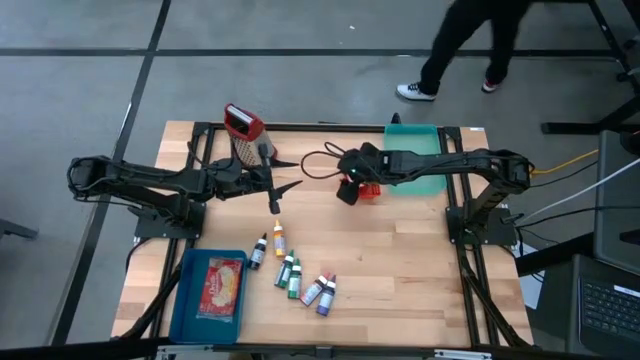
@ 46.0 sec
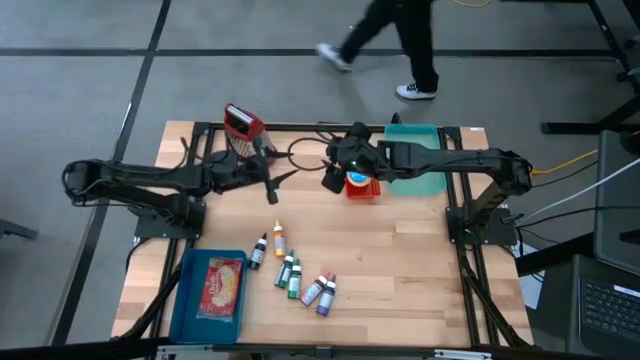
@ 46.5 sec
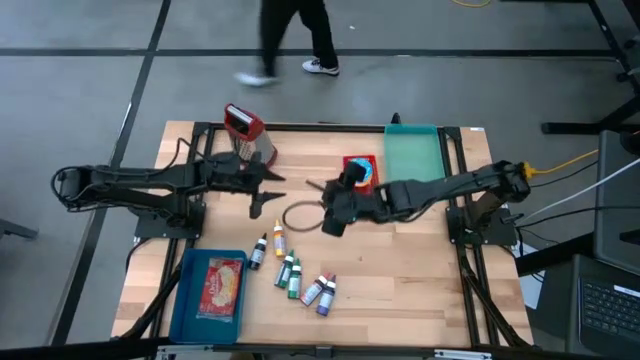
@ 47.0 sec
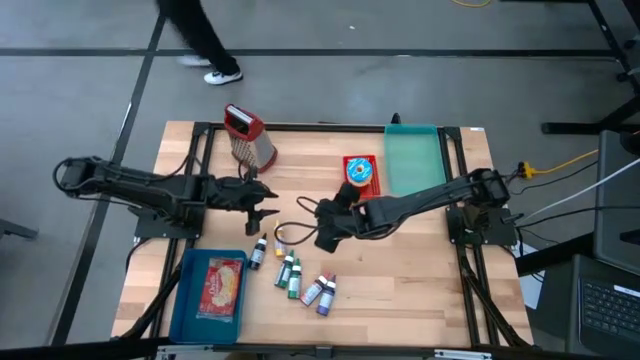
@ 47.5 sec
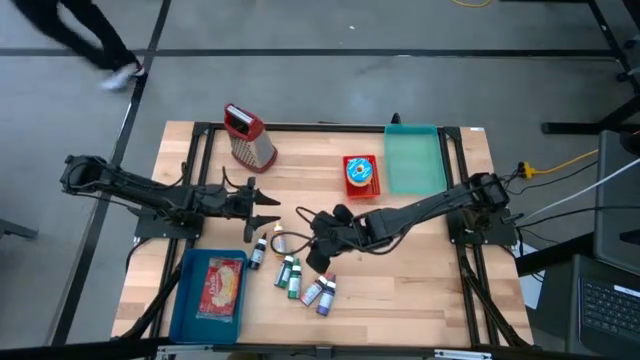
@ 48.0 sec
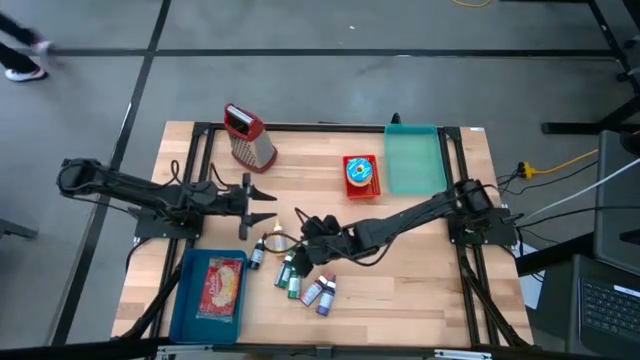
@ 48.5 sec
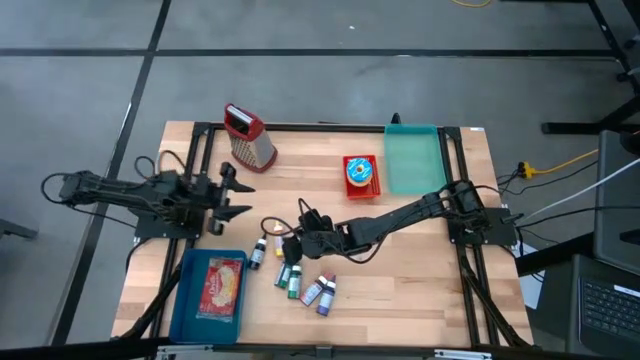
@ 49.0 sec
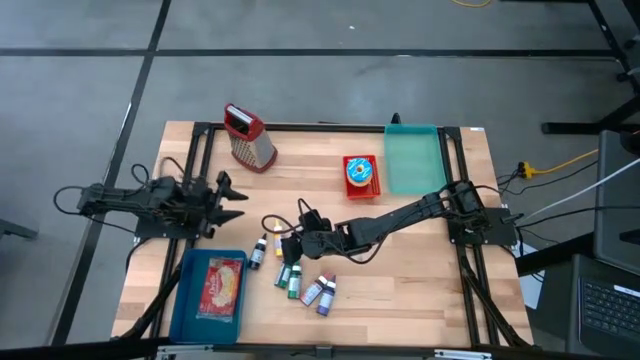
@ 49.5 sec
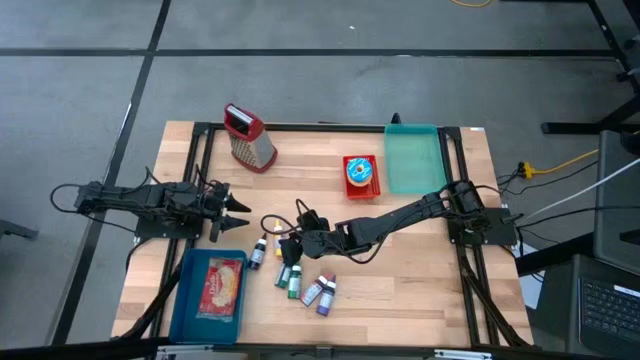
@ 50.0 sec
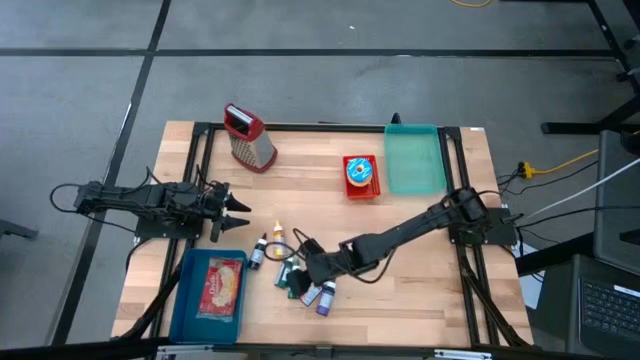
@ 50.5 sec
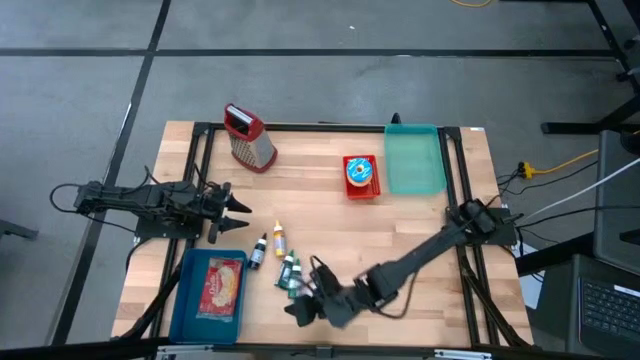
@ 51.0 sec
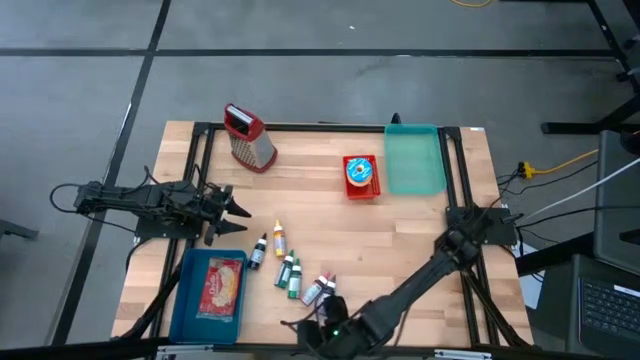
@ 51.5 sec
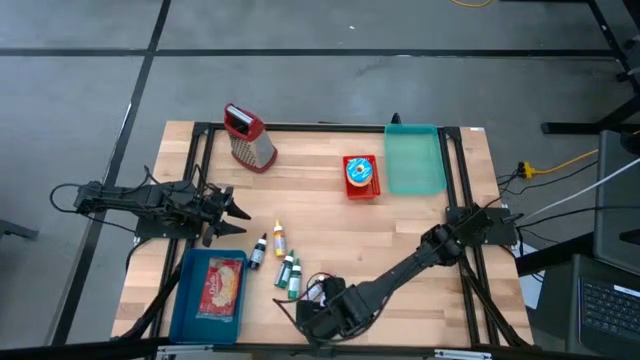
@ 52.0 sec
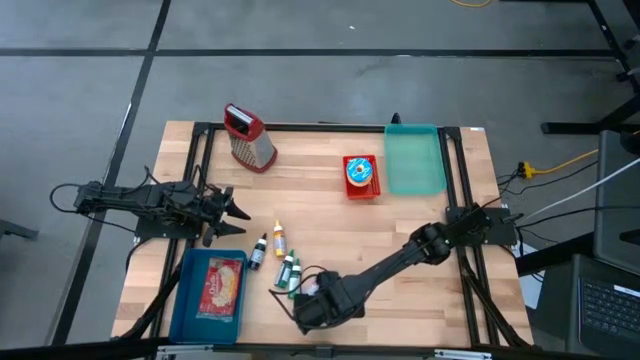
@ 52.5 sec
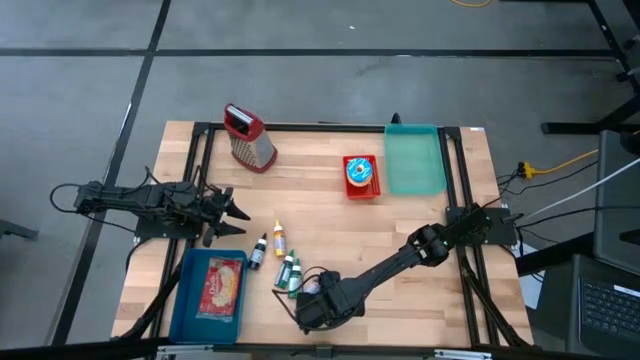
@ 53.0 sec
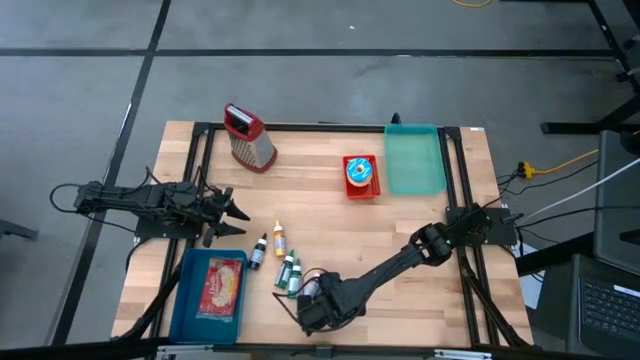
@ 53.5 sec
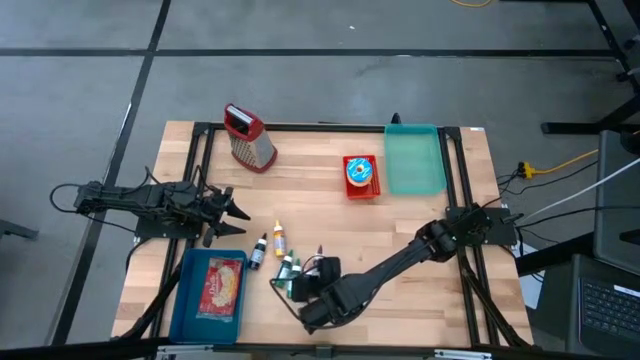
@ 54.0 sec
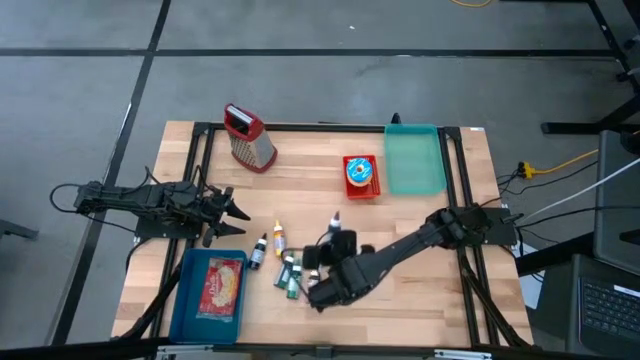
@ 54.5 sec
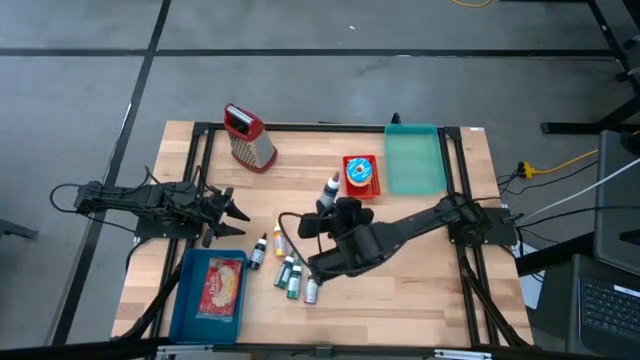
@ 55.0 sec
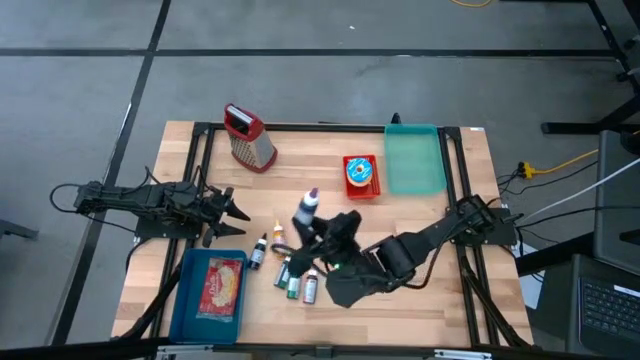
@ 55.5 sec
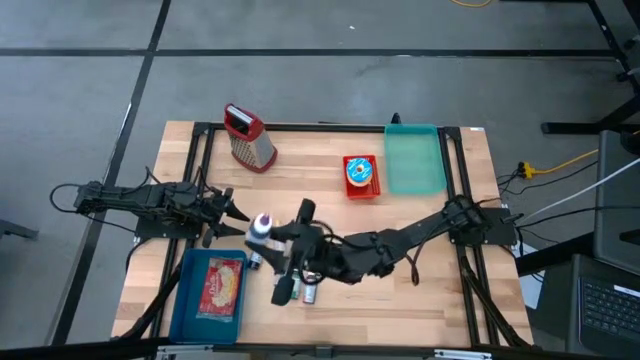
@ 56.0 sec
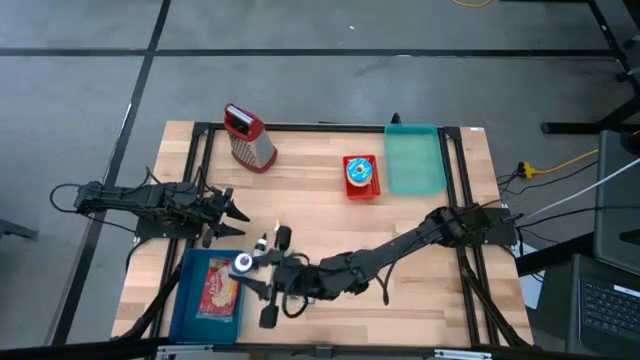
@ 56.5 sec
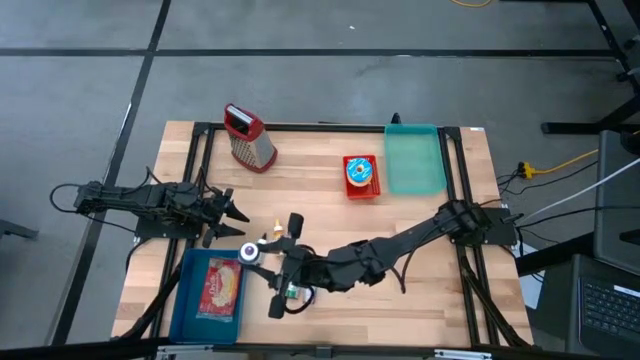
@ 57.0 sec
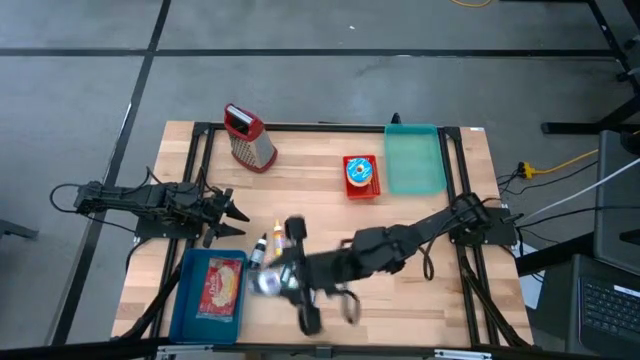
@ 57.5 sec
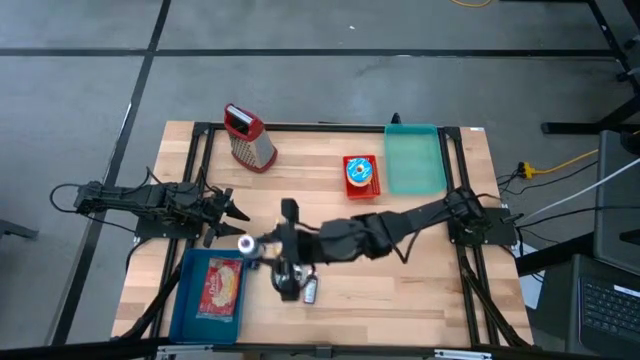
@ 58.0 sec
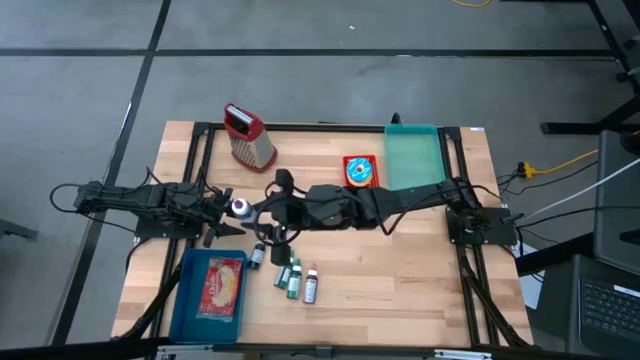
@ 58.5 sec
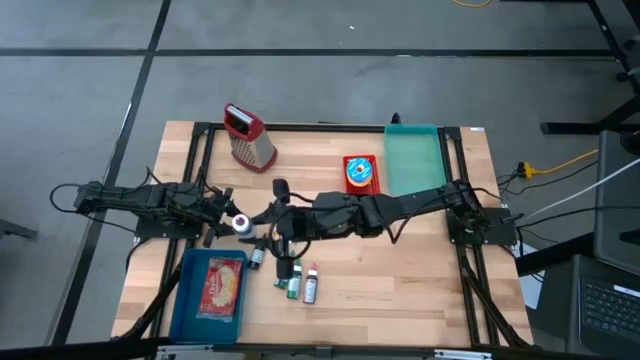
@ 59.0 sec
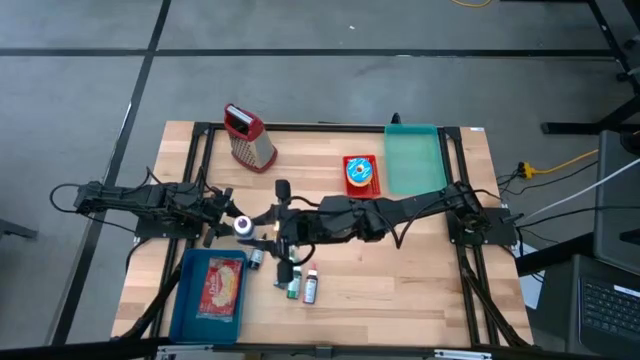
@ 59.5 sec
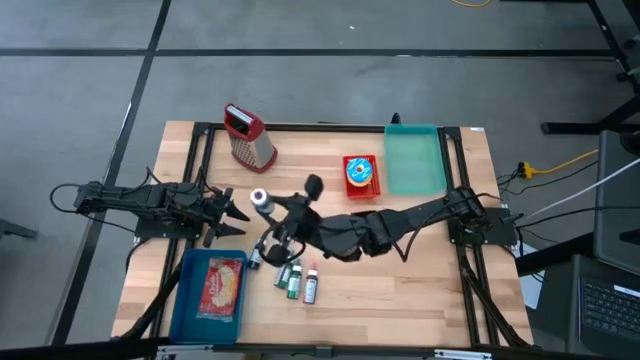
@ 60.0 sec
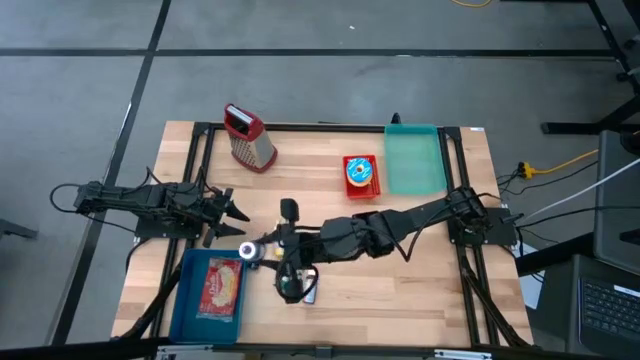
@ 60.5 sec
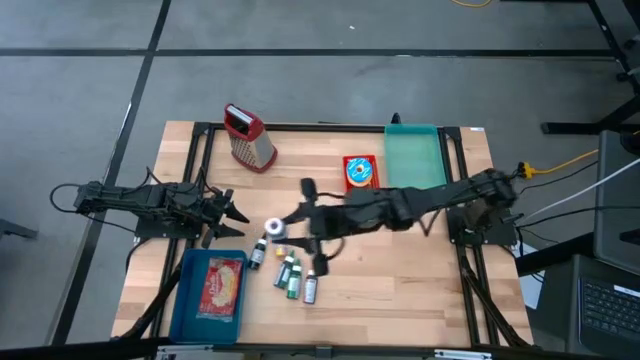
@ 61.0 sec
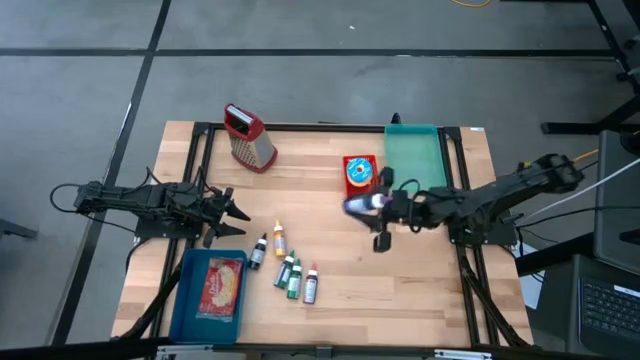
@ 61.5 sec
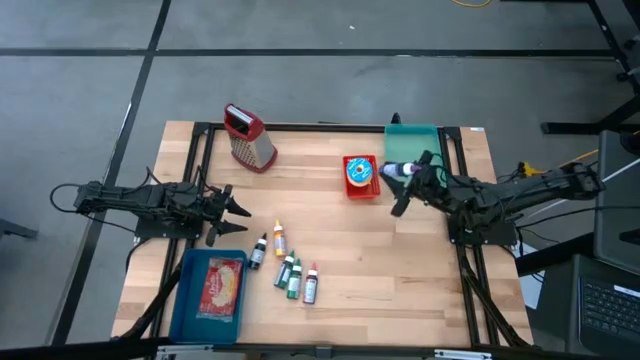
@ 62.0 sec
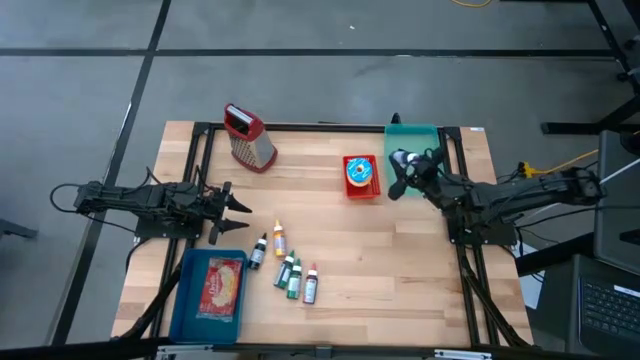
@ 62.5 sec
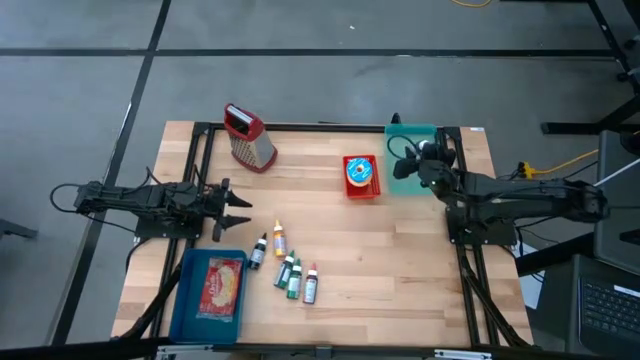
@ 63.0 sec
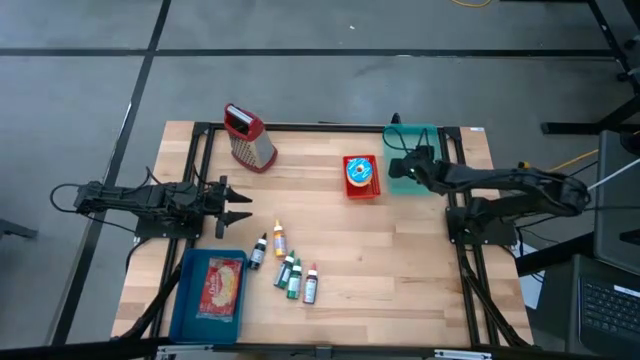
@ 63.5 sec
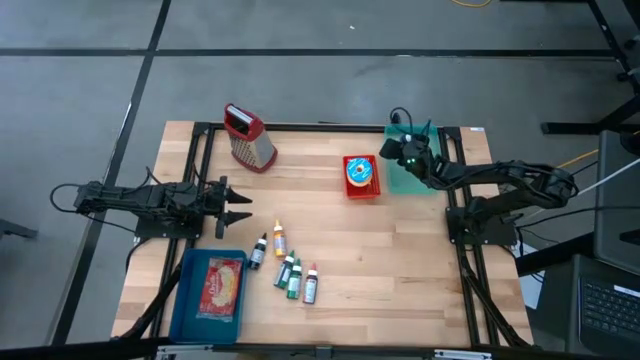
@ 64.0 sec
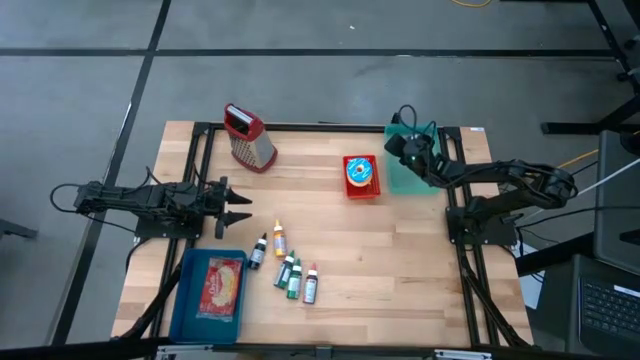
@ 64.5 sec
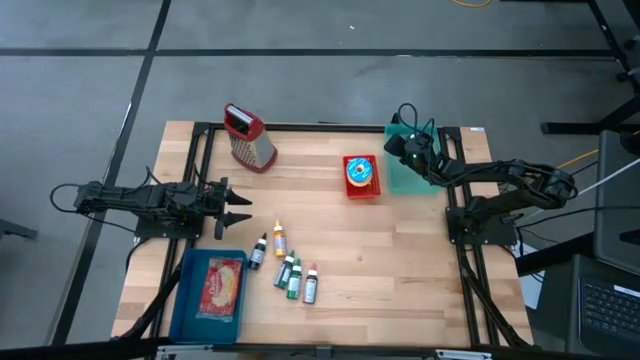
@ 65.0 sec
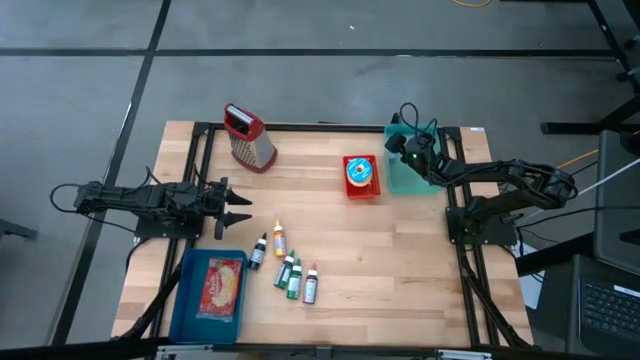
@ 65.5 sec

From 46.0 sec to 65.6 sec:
Put the violet food coloring bottle into the green bin

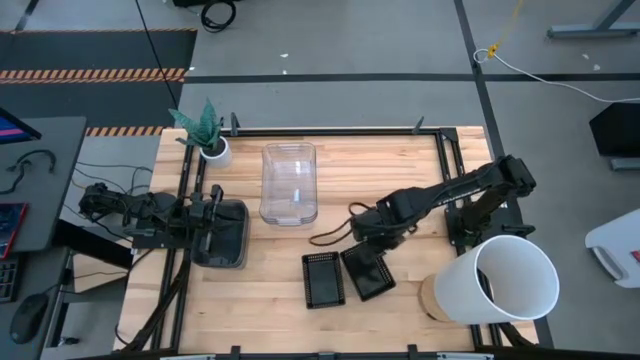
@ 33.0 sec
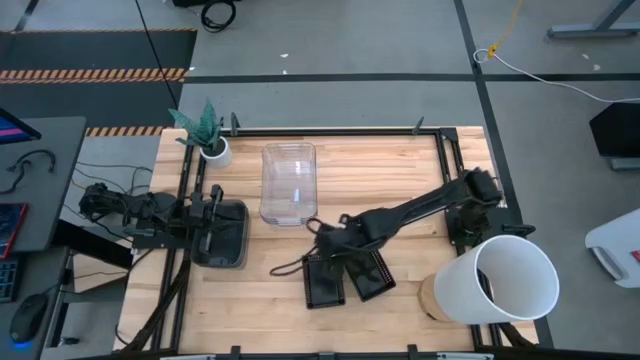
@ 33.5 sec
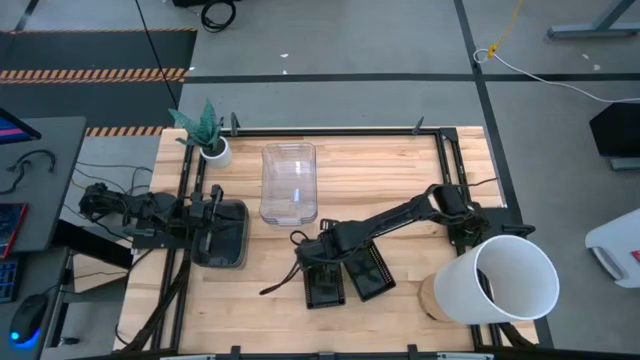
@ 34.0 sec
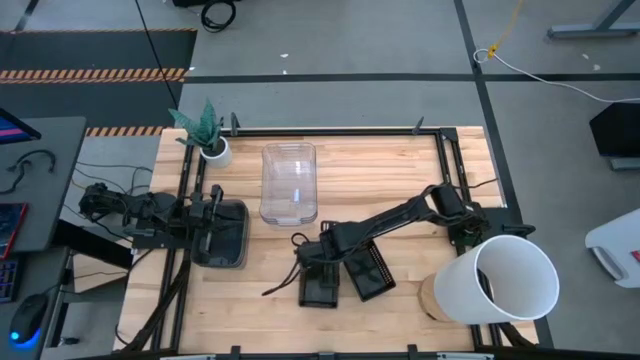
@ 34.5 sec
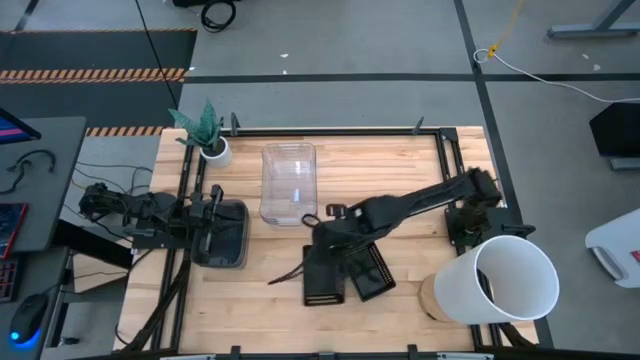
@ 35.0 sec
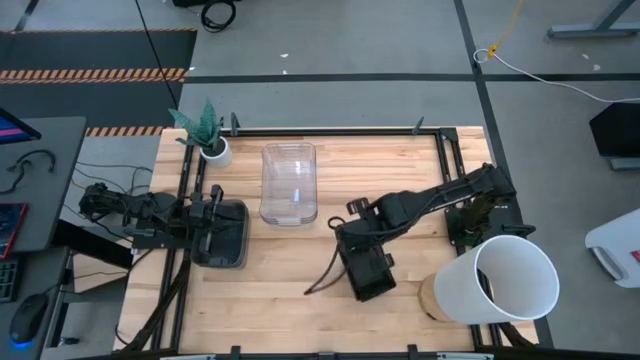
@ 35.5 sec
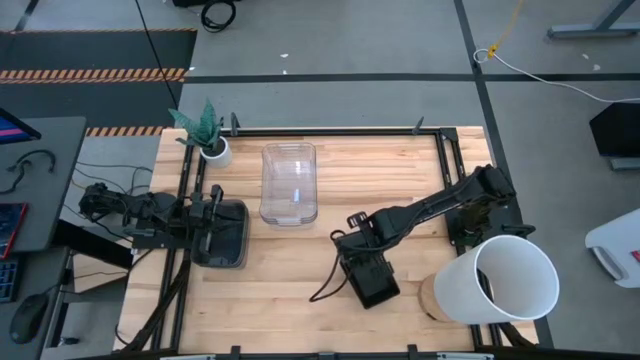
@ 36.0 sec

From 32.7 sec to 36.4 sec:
Stack the left black basket on the right stacked black baskets
